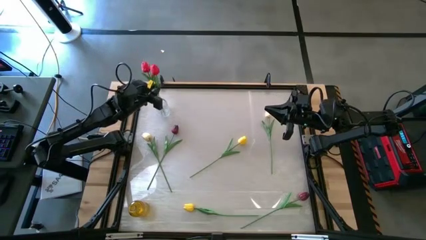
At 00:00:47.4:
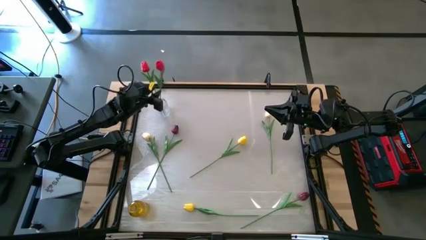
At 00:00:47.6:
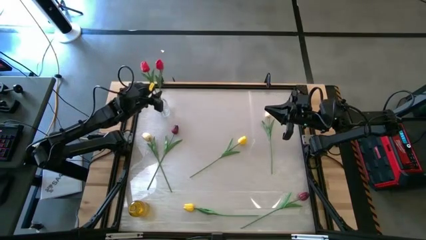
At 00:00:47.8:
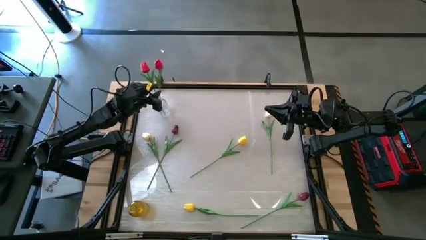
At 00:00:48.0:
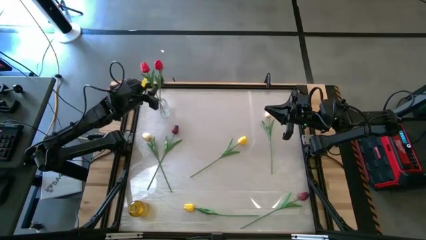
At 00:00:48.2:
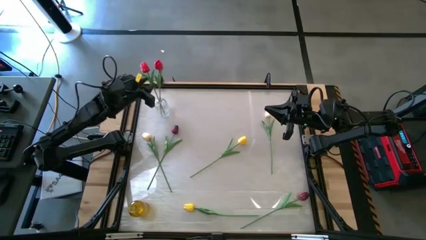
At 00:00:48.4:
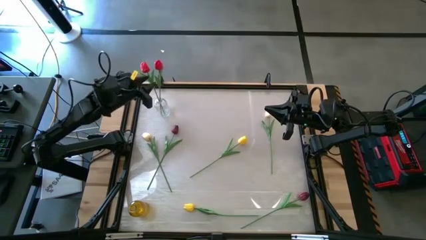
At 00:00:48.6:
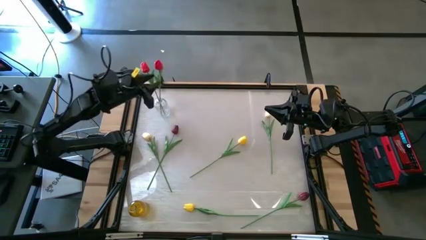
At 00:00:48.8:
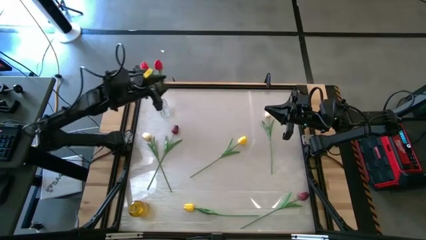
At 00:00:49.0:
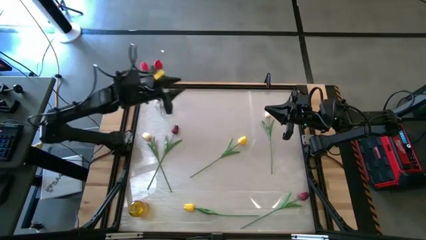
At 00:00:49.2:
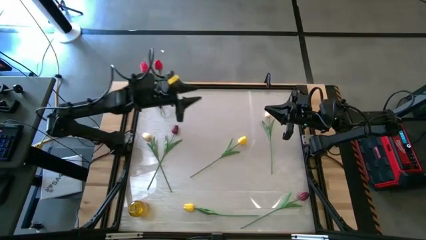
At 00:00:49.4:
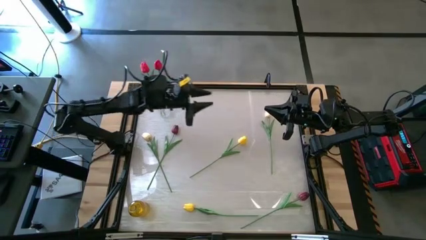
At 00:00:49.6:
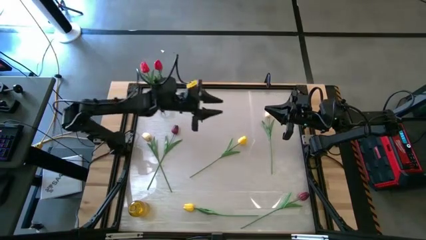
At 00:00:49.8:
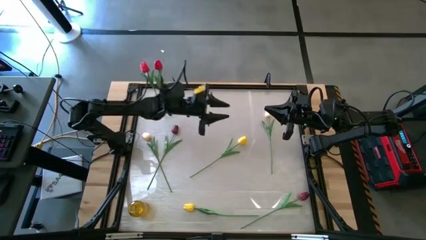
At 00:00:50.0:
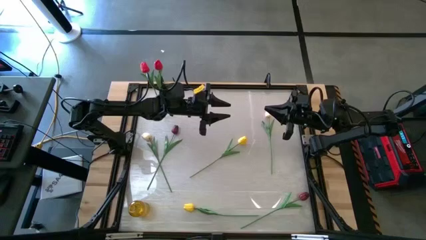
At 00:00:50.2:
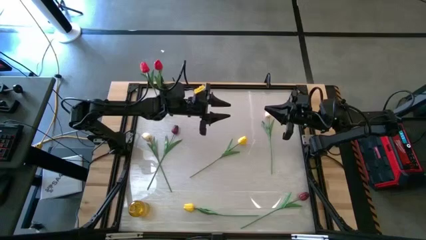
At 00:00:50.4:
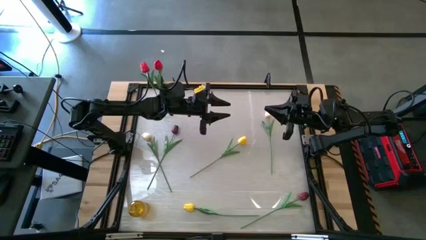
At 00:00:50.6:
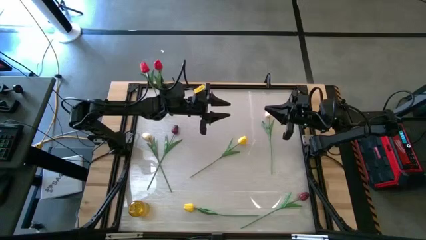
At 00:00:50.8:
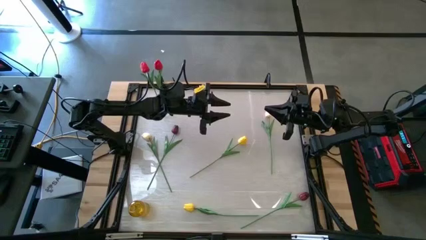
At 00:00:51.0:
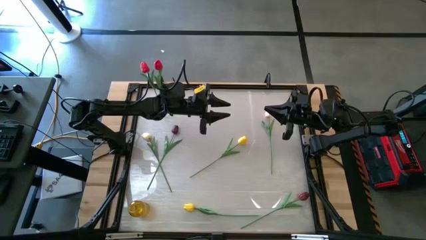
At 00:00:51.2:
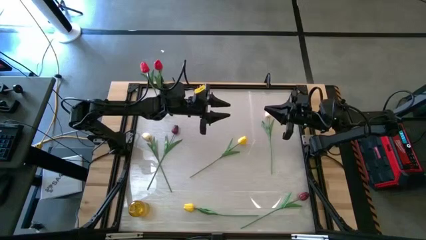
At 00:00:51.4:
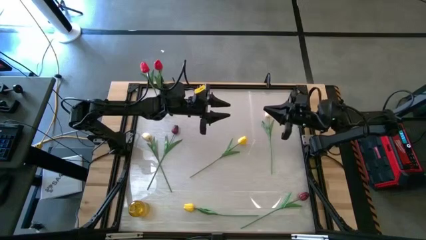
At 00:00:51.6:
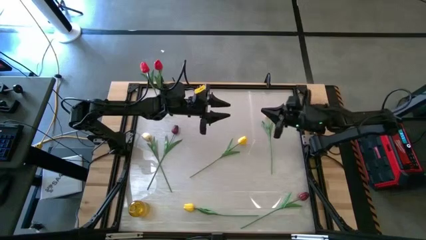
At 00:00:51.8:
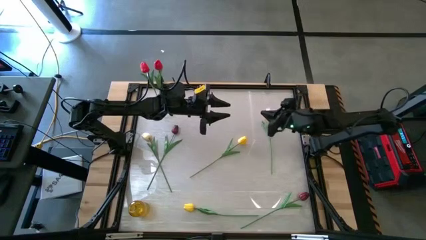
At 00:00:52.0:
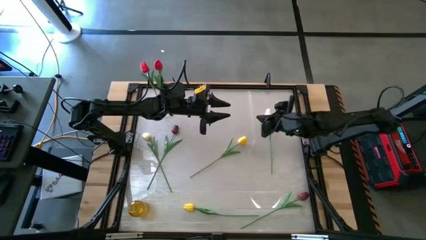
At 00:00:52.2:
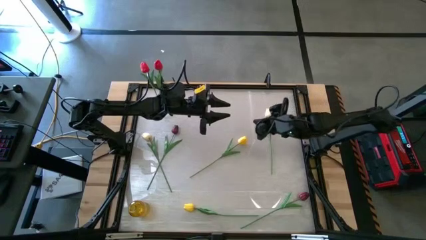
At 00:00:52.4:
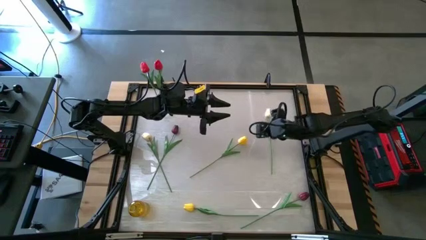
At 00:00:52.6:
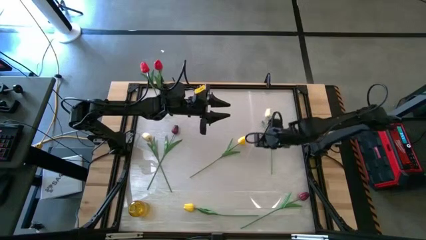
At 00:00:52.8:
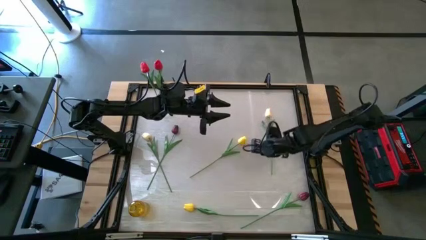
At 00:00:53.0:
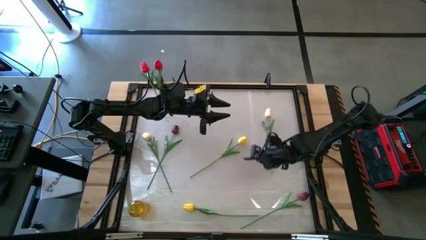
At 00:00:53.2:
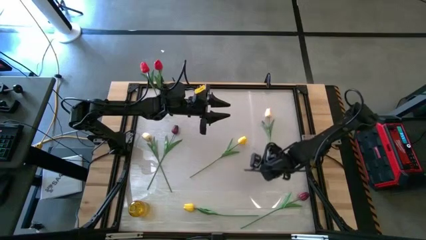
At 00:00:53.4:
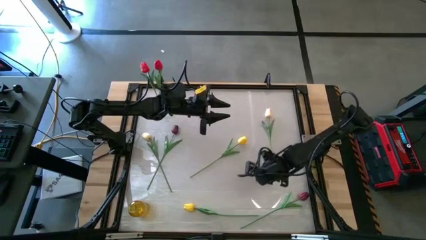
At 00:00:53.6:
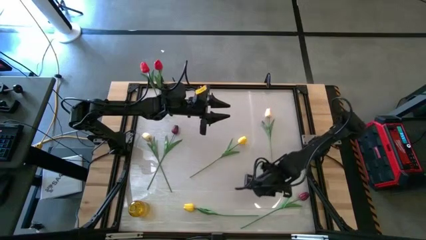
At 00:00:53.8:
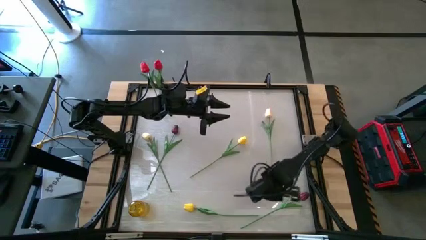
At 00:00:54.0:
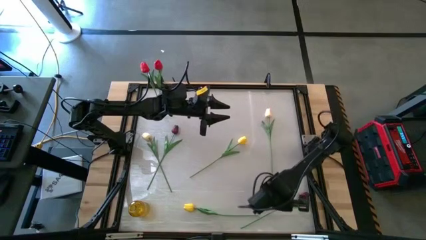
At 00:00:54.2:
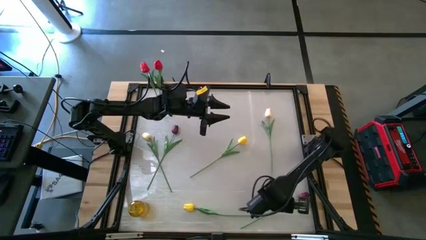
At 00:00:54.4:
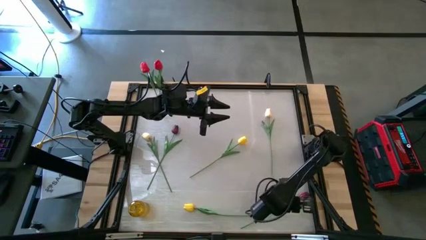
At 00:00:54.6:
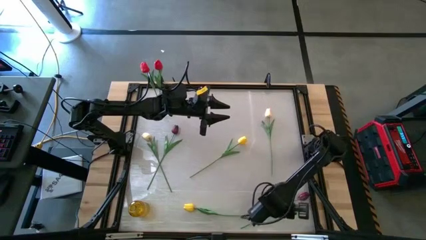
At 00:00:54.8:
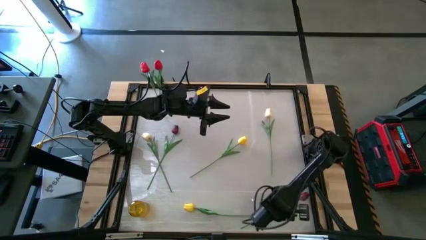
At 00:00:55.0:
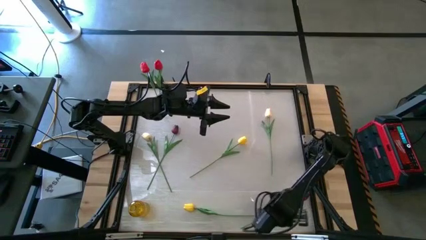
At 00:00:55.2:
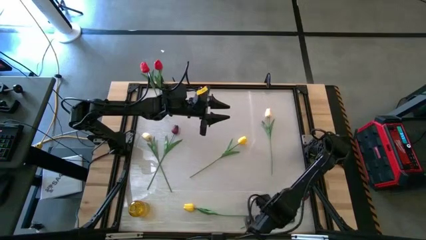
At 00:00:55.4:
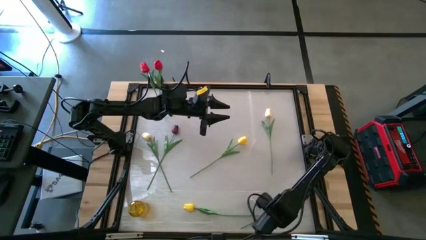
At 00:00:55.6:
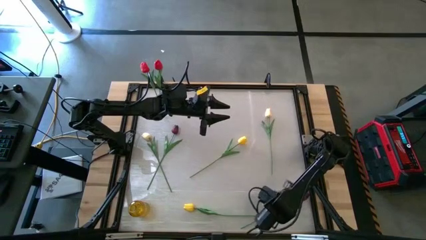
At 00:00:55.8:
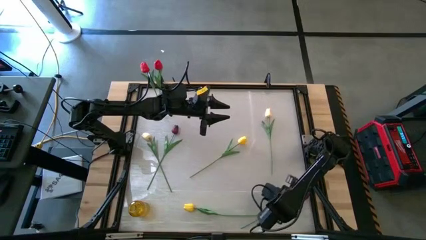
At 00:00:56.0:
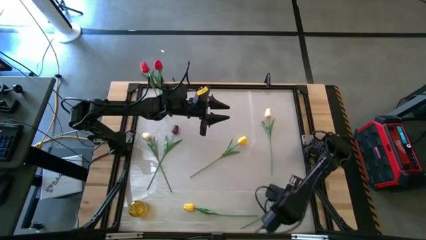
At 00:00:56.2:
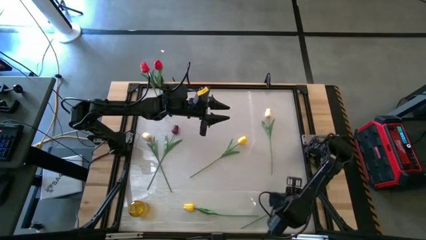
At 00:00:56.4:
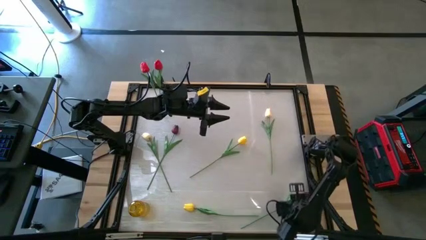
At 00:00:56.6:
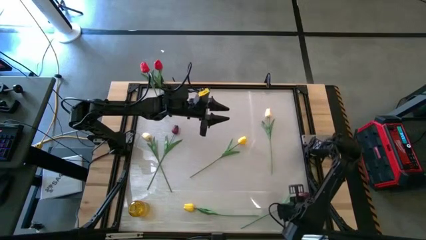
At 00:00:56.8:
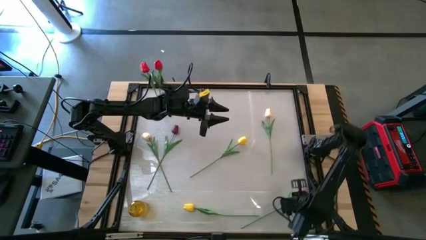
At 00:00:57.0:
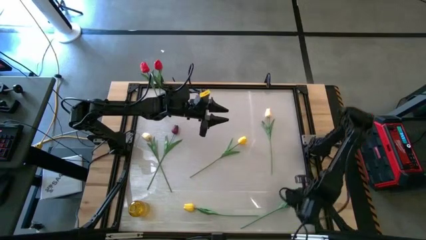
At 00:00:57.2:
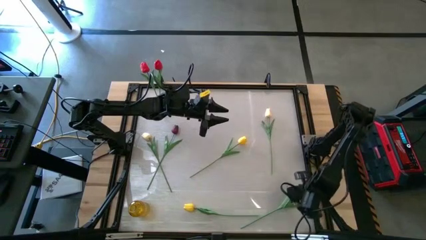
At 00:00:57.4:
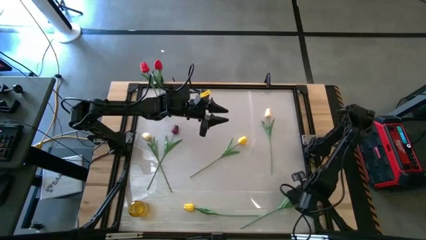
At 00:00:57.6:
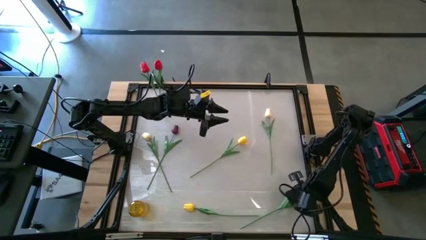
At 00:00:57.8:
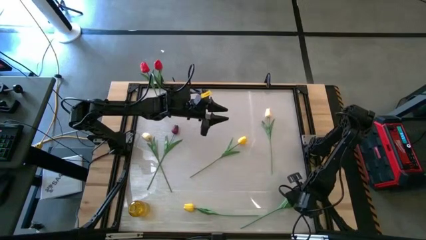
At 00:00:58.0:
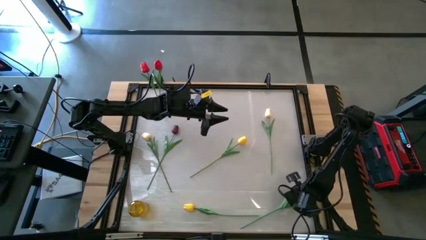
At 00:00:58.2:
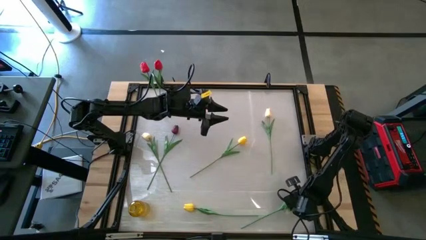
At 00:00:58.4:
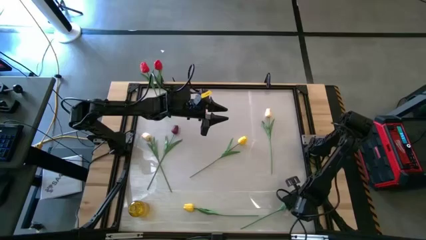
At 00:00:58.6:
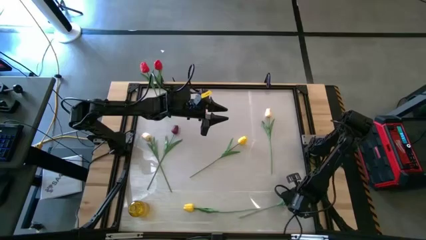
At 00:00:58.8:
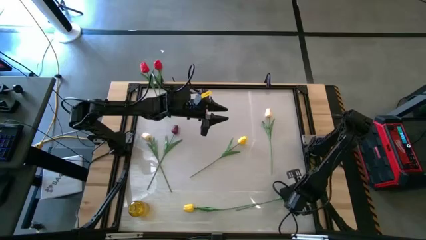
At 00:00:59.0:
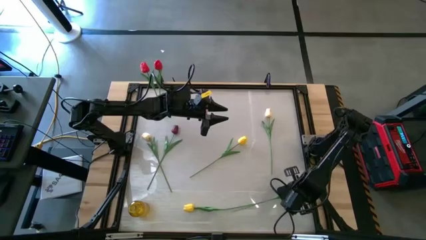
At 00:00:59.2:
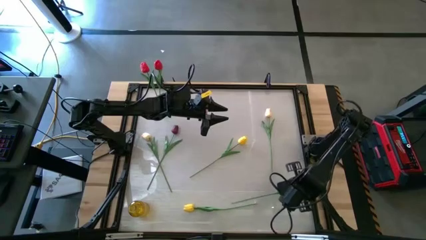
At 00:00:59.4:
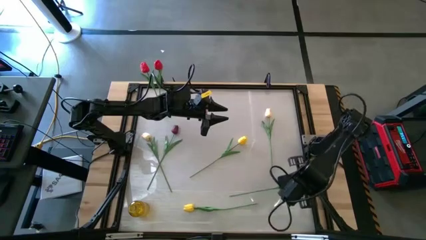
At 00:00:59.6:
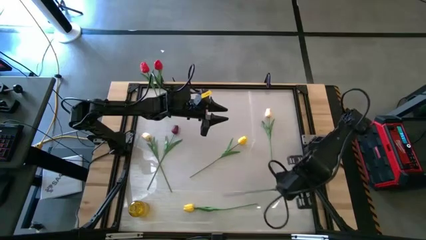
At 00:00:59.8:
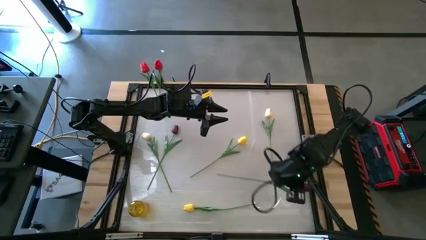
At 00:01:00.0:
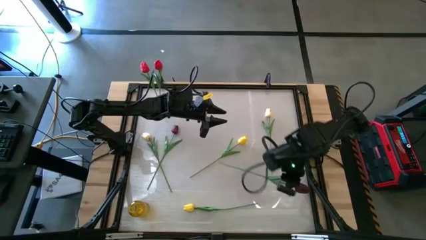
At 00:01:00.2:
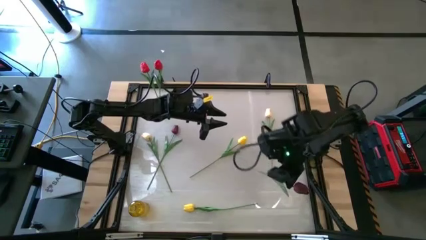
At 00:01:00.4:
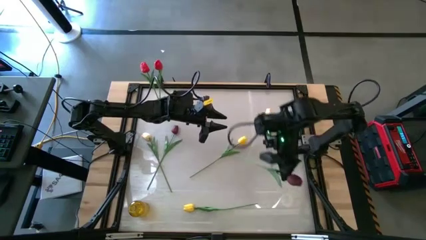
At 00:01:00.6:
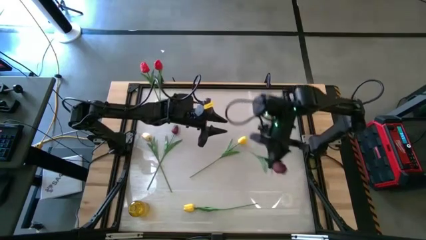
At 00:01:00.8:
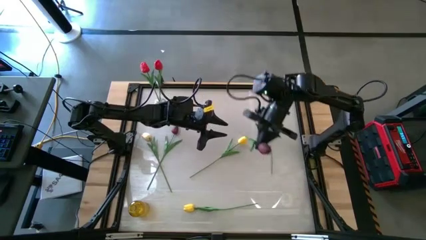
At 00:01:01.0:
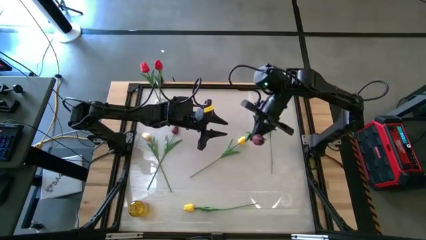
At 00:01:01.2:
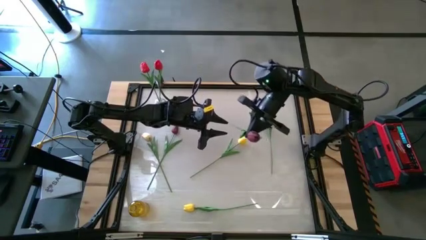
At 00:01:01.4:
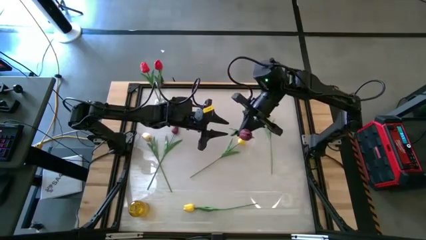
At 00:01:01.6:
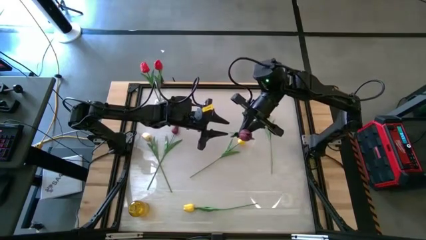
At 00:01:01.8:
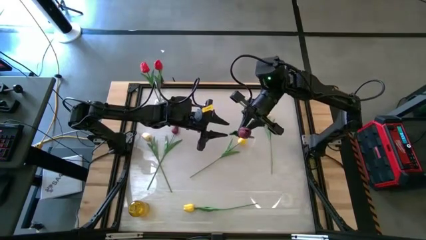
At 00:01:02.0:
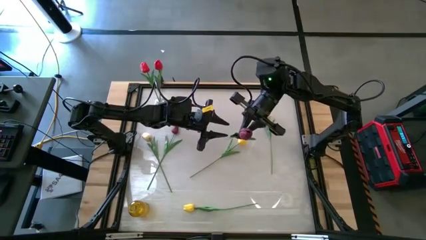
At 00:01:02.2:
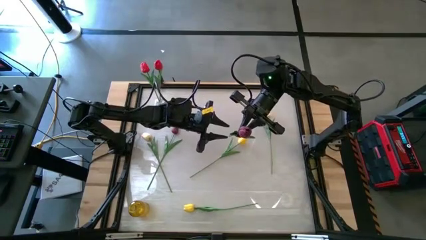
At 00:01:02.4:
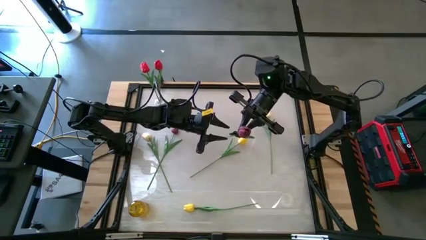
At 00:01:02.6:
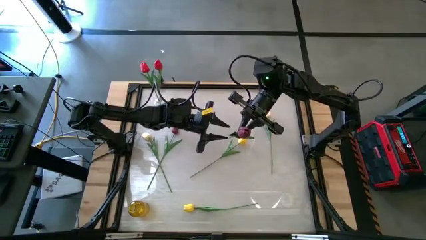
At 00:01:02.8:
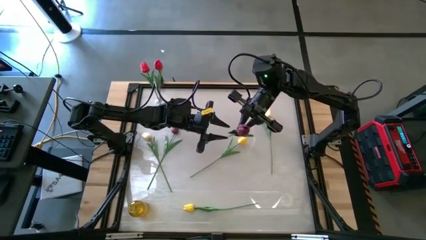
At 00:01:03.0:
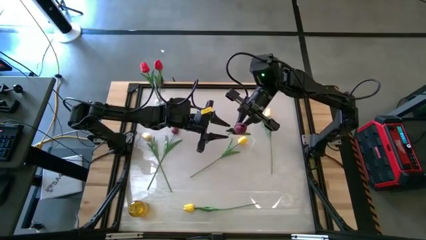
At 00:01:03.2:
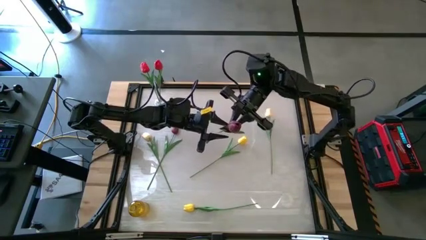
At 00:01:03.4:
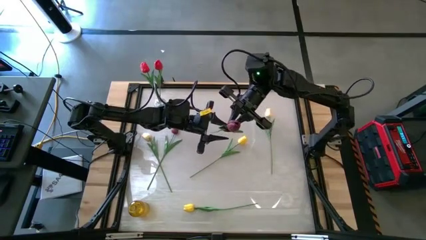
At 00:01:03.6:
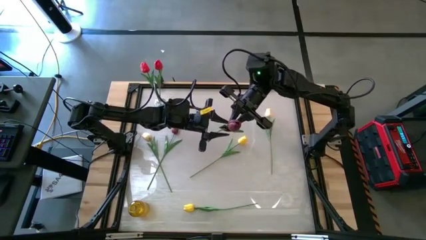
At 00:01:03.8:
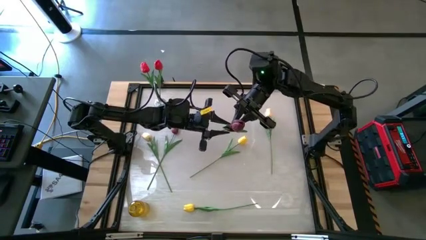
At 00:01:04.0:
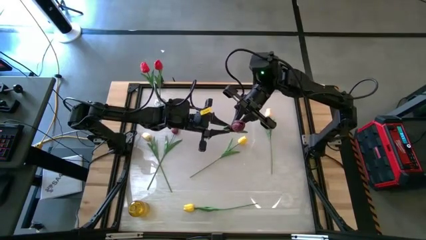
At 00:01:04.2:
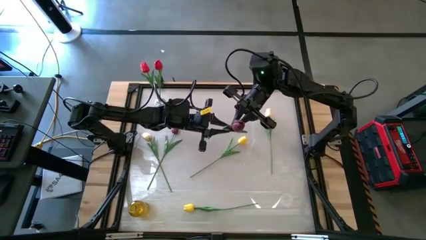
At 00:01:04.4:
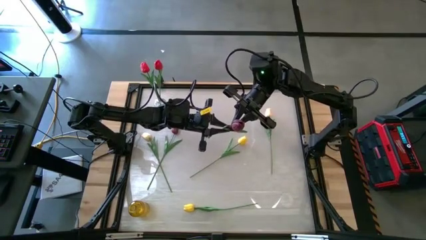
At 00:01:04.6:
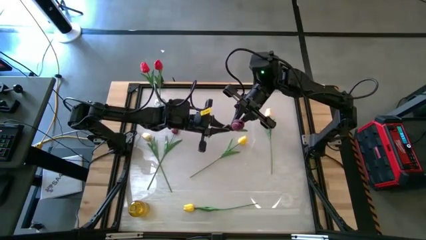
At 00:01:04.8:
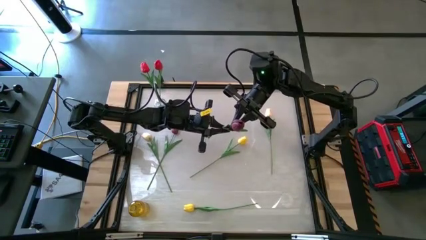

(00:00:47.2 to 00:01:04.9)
Task: Sort flowers into vase by color
Put the right dark red flower into the transparent vase
